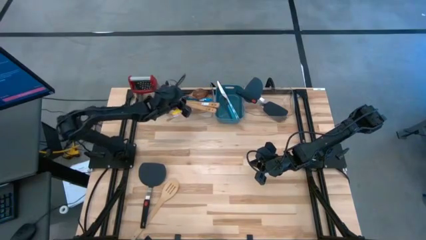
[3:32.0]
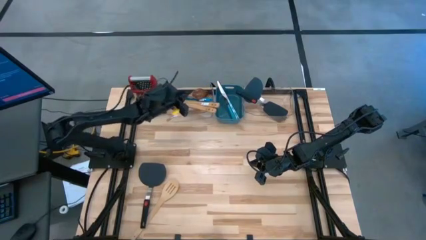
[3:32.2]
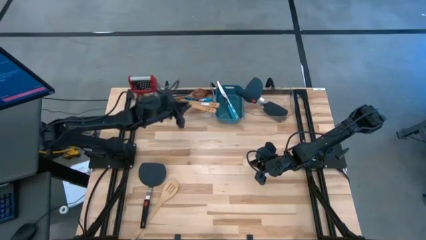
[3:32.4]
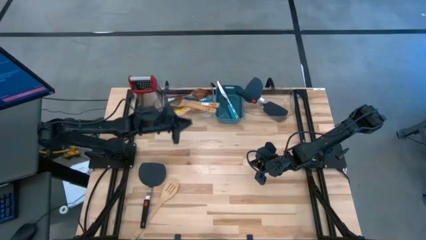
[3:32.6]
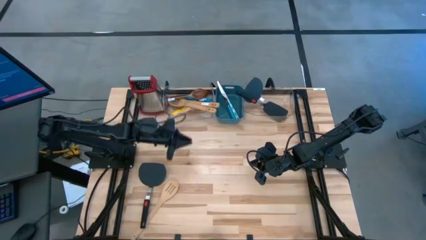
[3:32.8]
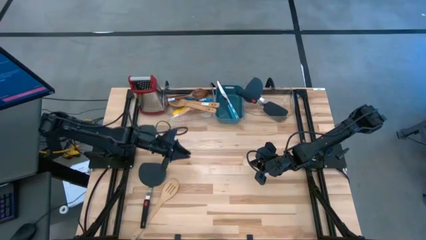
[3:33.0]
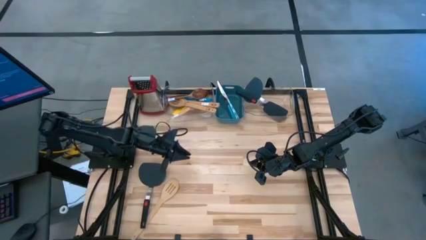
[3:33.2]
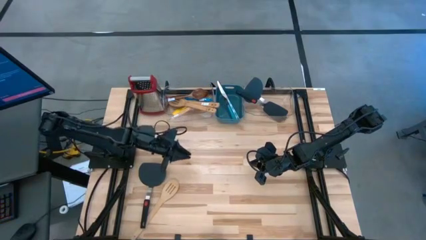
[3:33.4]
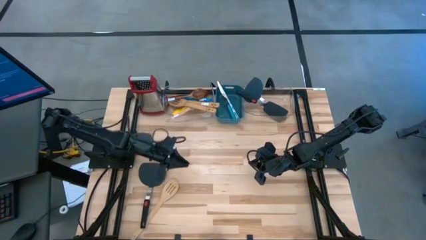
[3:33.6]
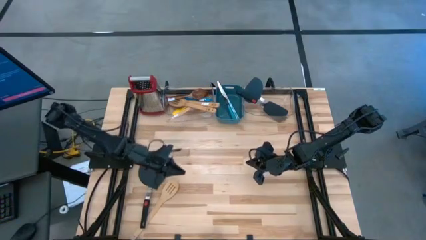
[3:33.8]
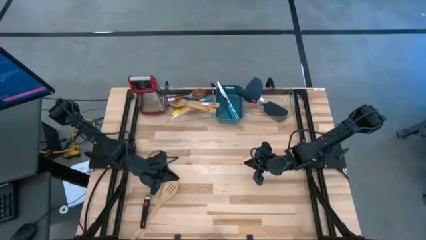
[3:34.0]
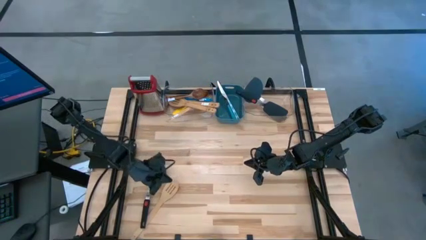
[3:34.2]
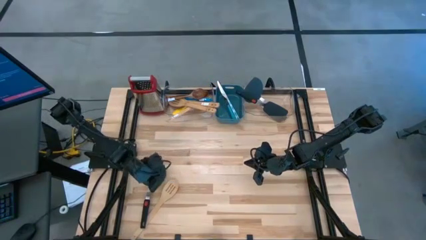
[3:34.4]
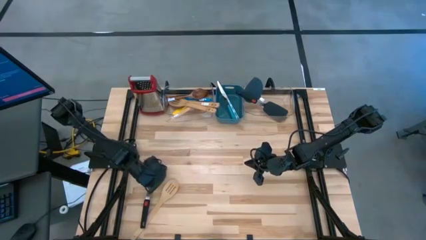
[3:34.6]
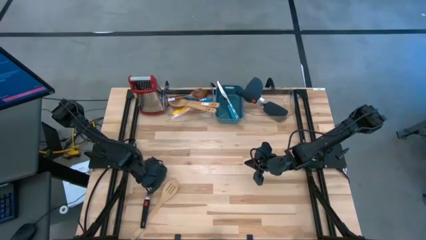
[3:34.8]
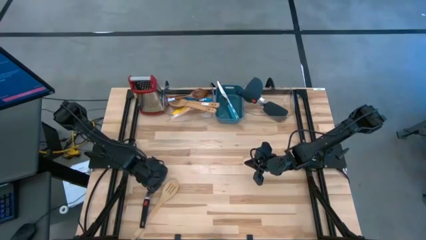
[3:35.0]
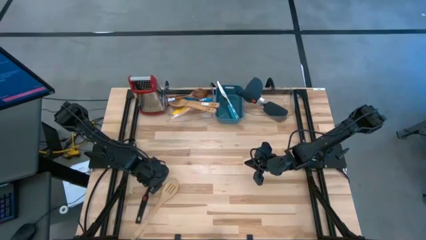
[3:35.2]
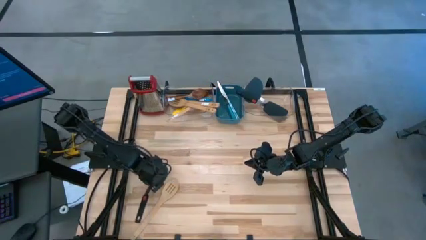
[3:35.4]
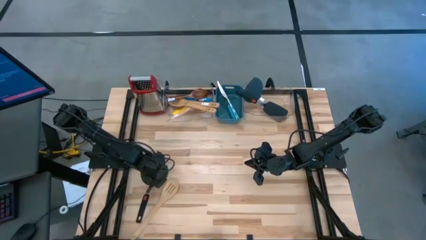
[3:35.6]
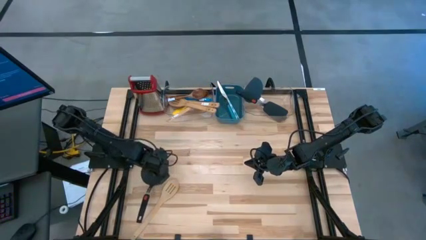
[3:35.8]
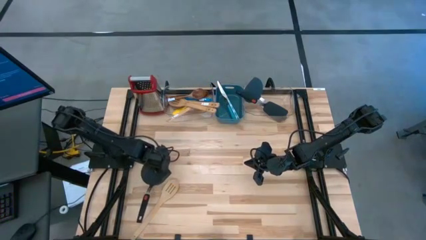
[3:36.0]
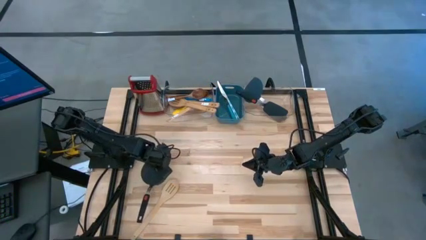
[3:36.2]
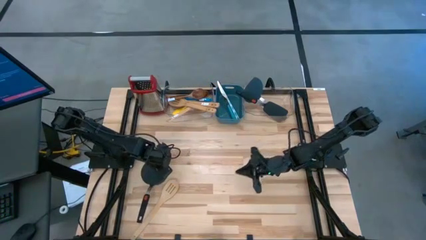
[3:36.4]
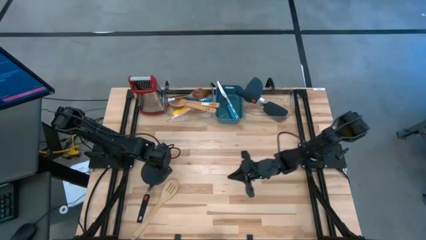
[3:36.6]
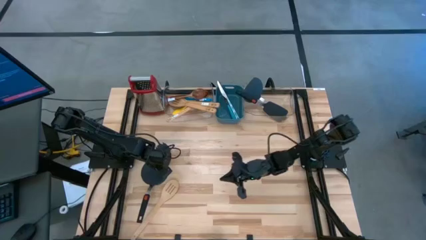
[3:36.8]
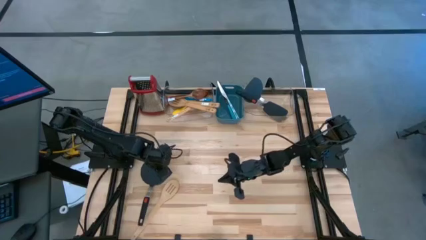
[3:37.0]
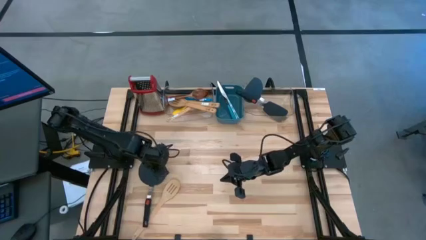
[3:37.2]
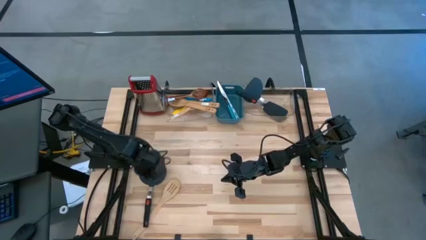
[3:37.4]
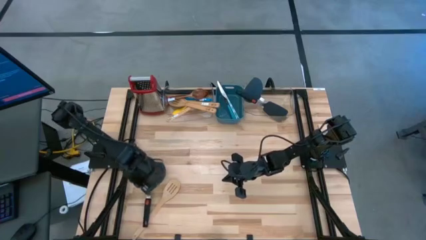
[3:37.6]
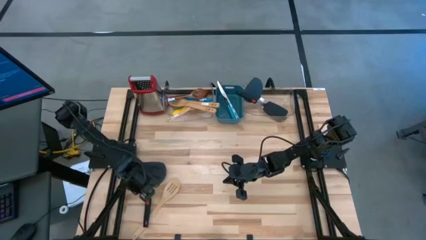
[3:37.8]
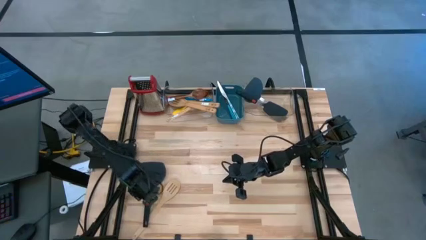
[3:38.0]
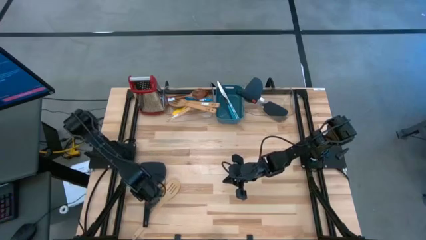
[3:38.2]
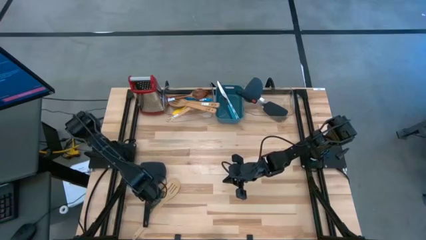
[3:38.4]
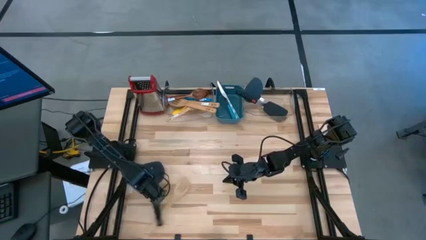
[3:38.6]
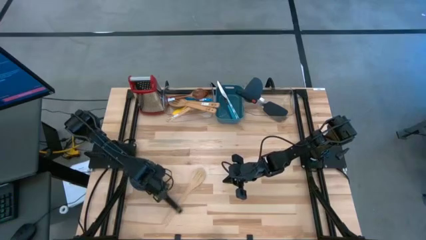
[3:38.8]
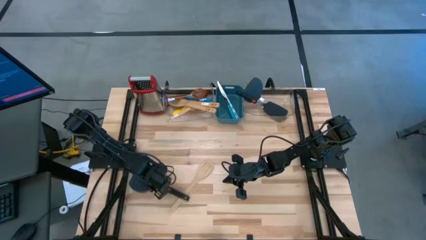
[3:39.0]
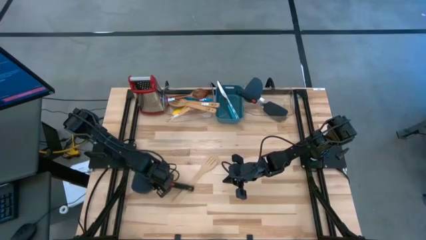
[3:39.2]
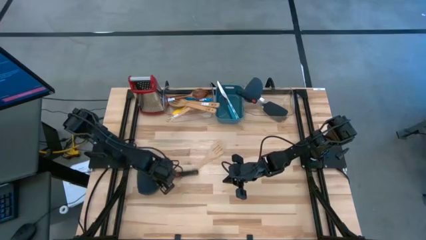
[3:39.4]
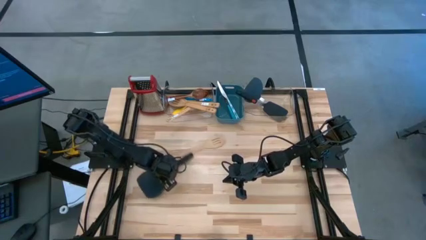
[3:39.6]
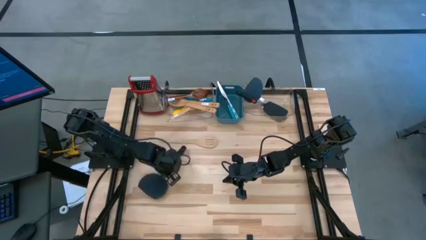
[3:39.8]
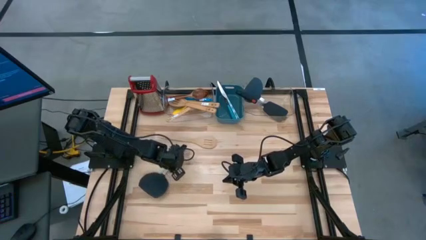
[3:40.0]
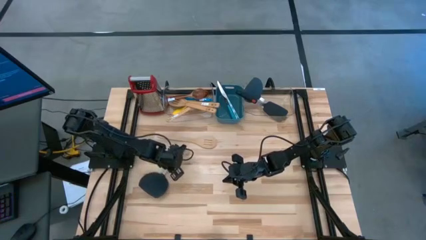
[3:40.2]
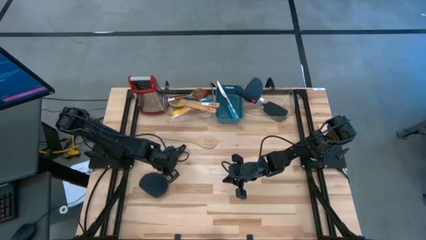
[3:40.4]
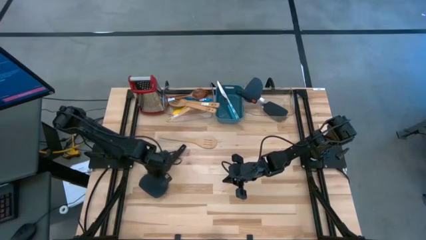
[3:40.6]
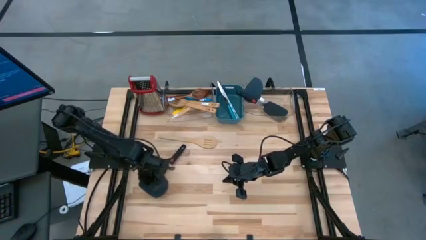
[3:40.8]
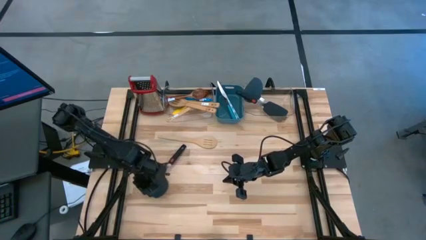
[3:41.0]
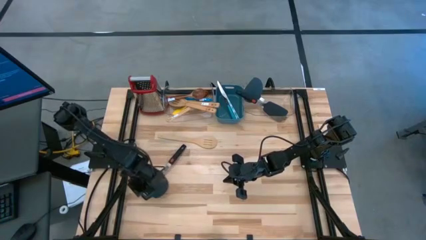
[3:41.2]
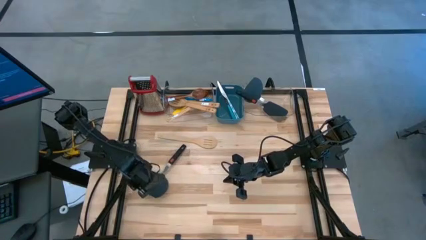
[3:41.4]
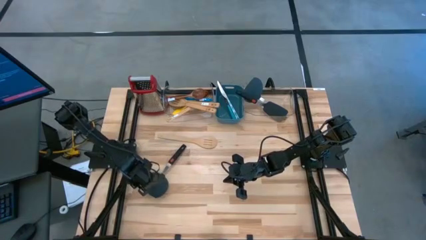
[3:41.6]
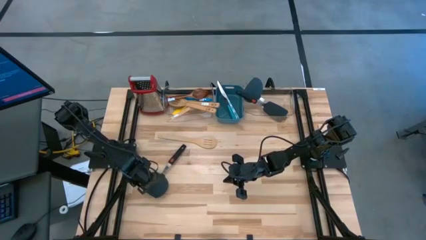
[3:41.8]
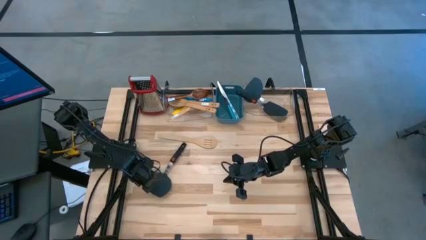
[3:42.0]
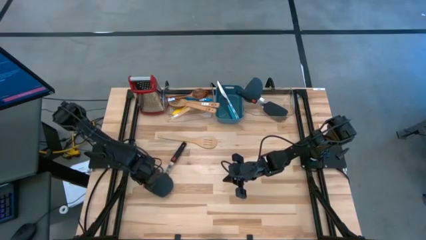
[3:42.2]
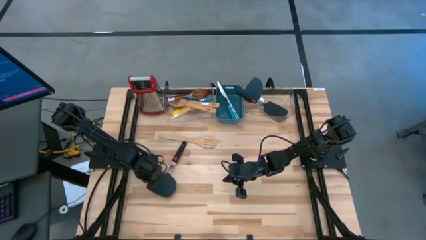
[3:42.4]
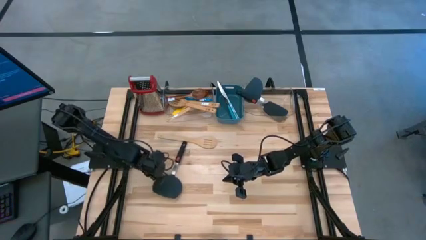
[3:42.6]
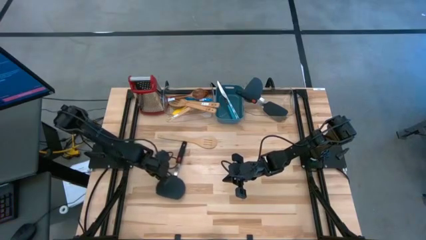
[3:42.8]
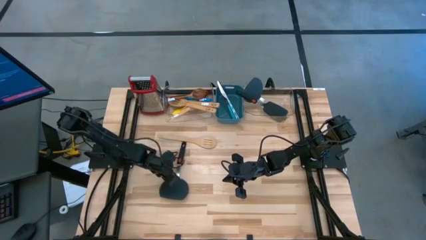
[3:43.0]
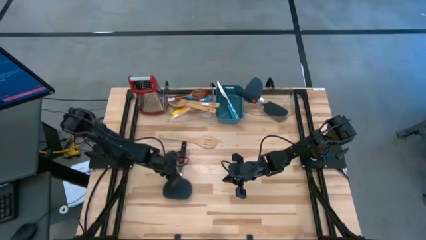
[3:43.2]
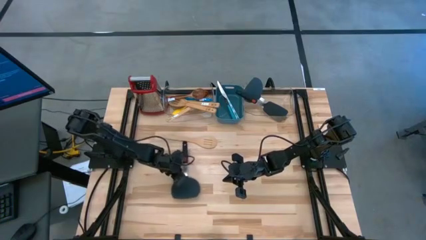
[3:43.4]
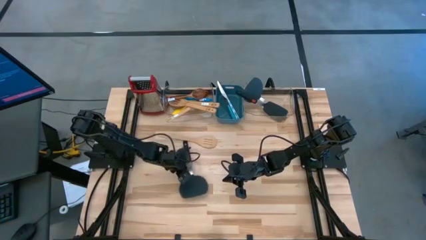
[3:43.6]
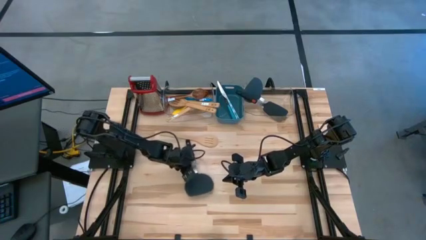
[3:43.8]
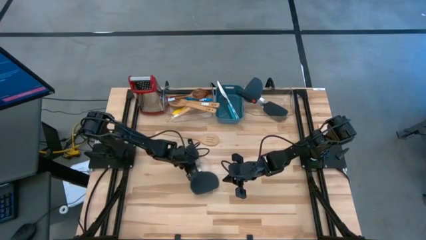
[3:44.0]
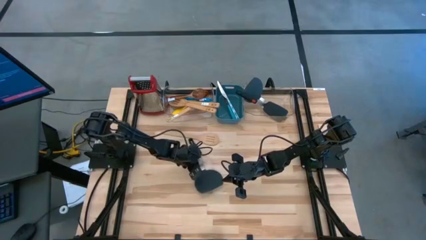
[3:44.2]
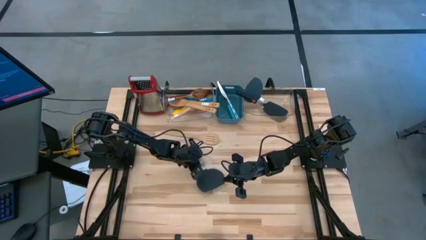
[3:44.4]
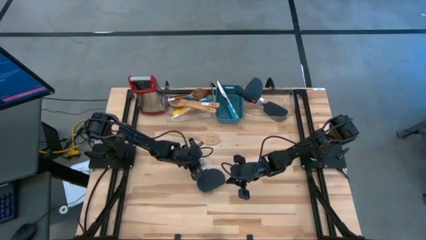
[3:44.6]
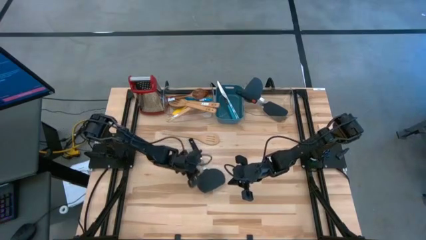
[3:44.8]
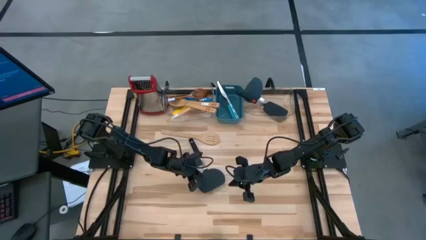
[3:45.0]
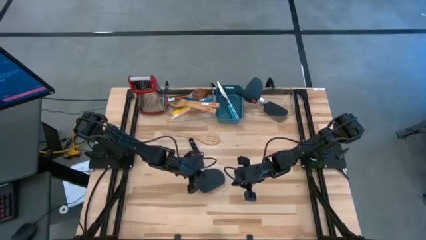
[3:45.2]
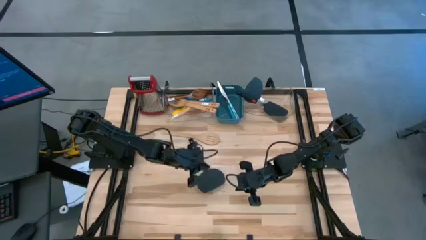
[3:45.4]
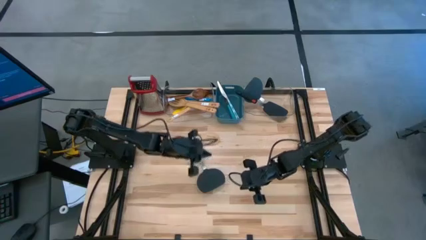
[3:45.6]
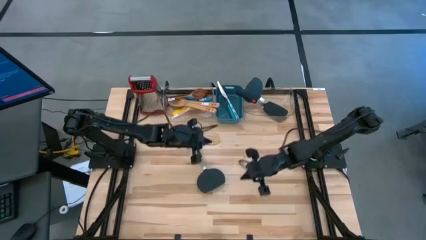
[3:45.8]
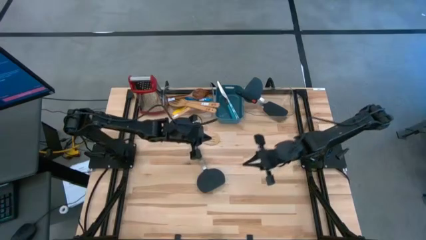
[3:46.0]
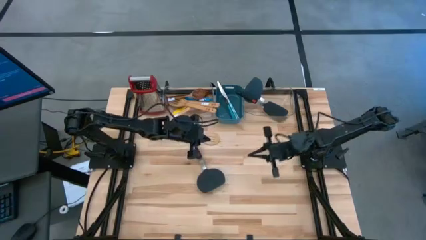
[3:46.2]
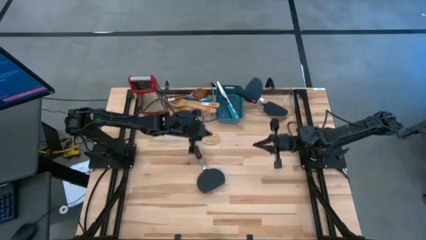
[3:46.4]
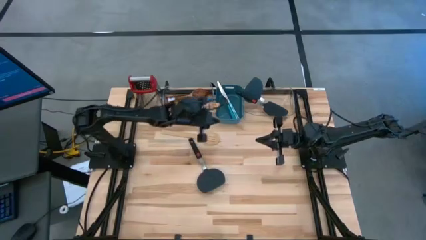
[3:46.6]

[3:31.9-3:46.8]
Task: Pick & Place Kitchen Items
Put the black spatula into the right transparent bin

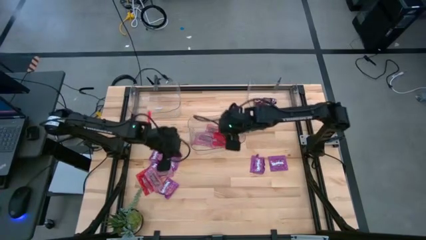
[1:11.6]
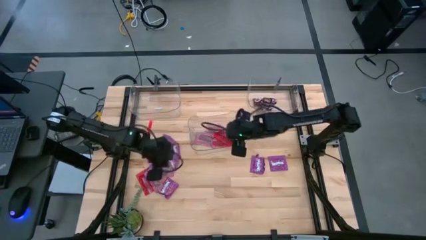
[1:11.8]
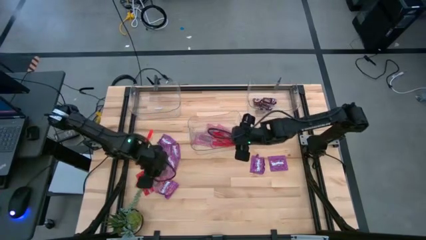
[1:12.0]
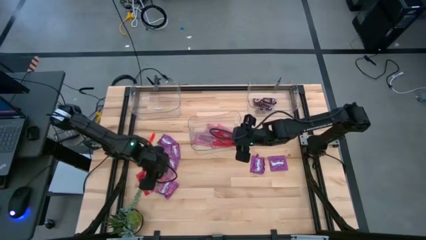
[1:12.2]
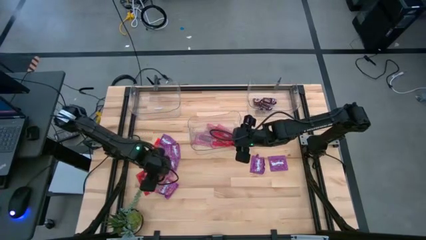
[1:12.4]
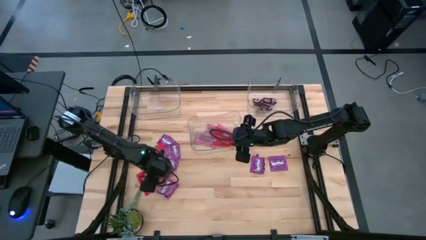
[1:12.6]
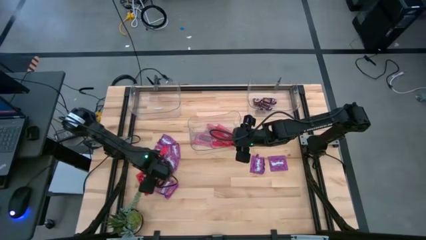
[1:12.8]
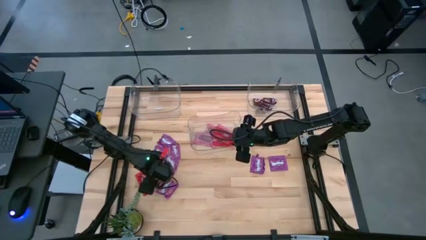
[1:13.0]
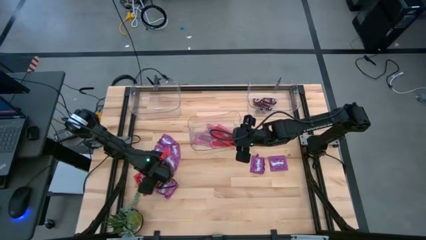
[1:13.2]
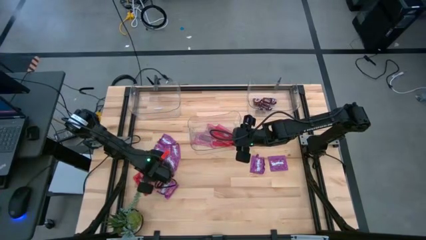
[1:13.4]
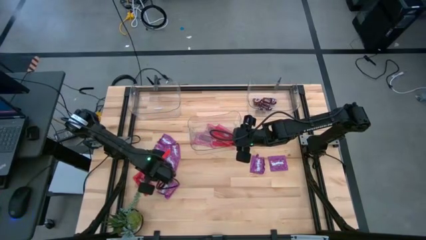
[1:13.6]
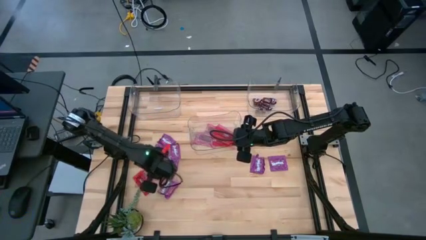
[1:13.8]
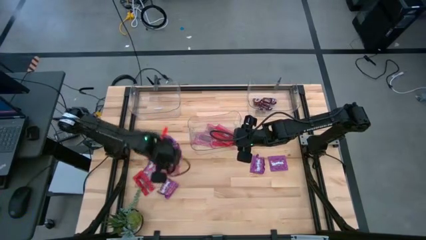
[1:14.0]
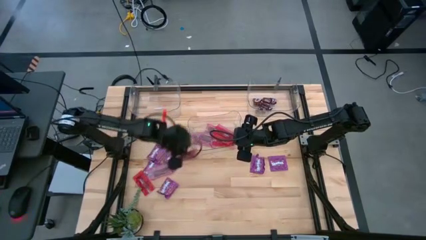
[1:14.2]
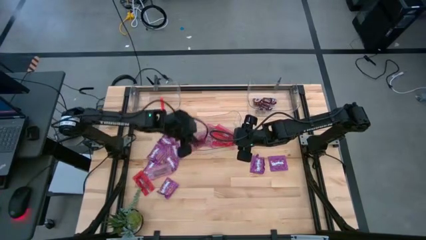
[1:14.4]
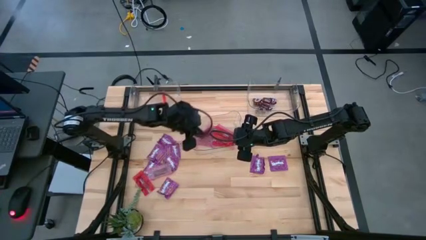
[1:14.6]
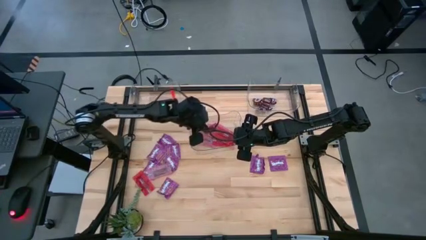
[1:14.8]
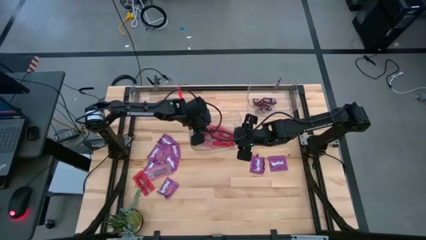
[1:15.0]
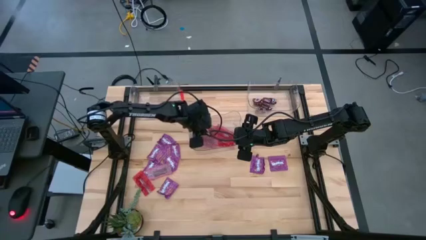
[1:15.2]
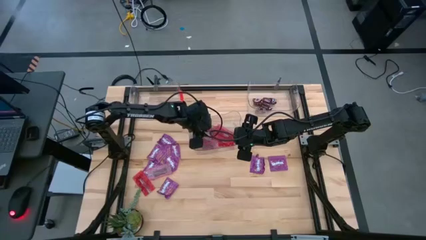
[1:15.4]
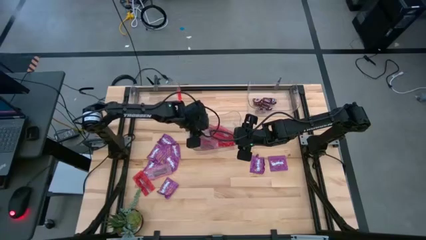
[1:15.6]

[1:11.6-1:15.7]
Task: Sort candy
Put the red candy pack into the bottom transparent bin
